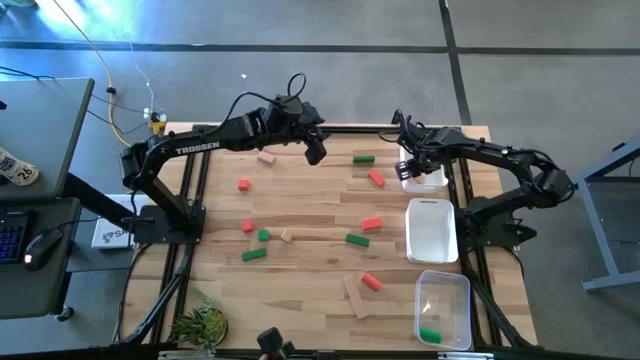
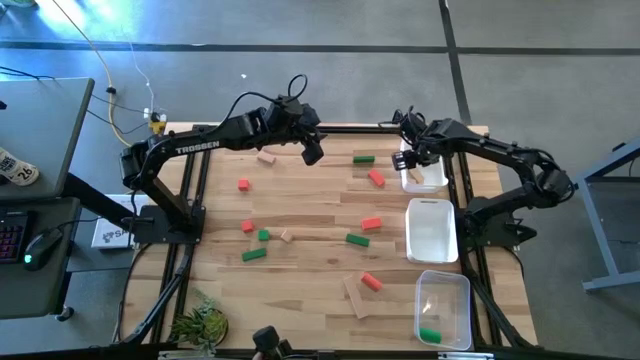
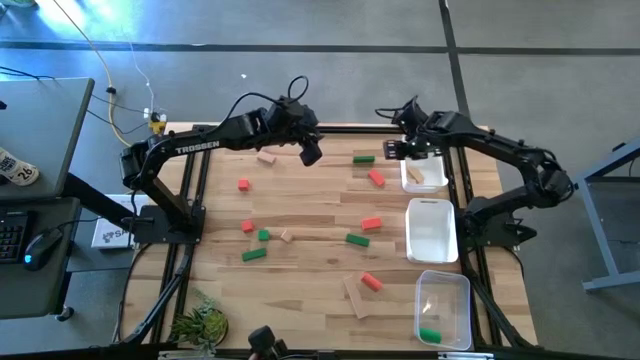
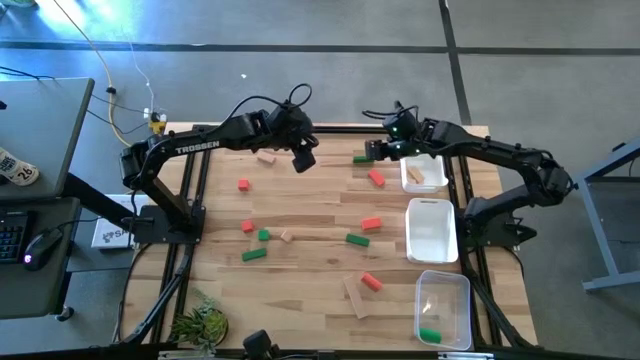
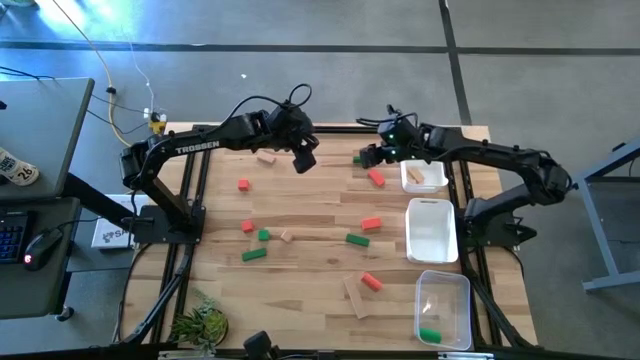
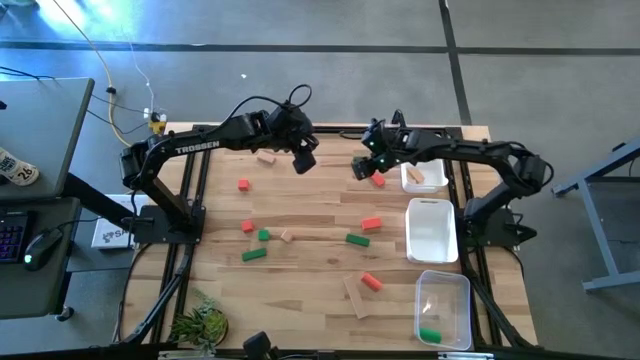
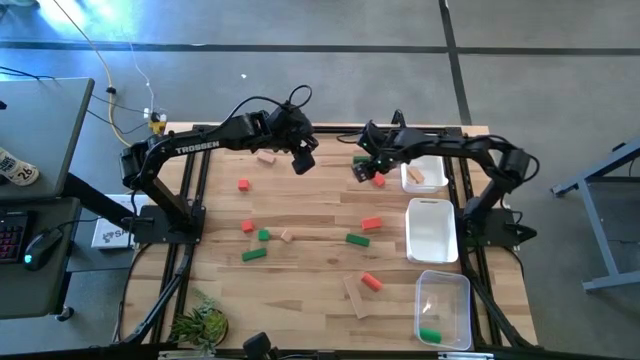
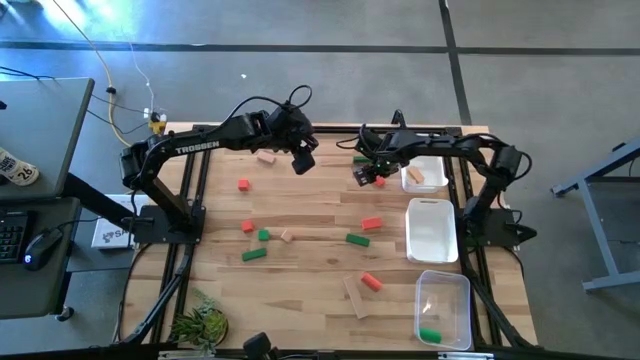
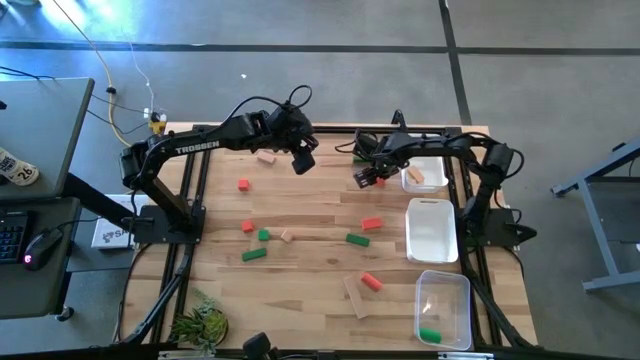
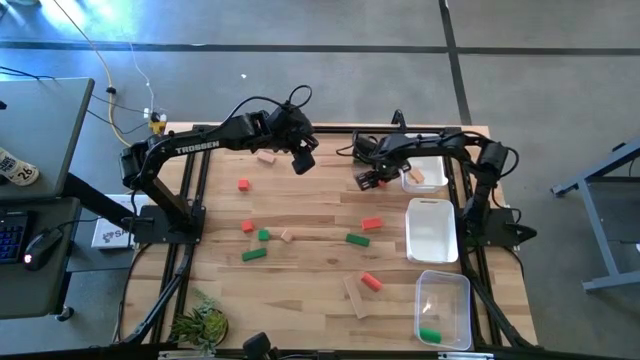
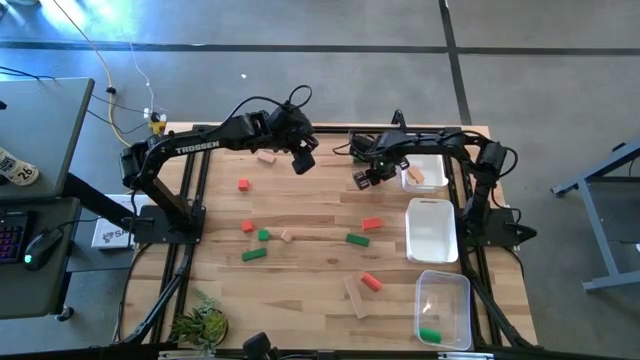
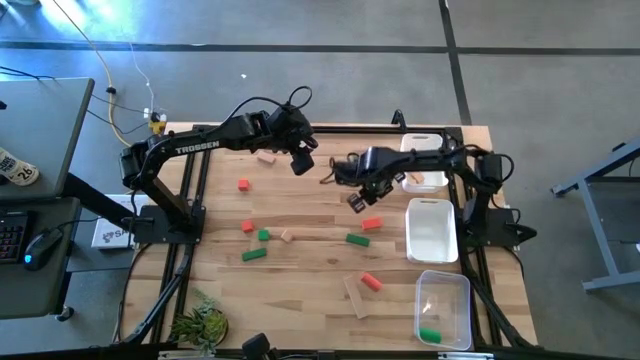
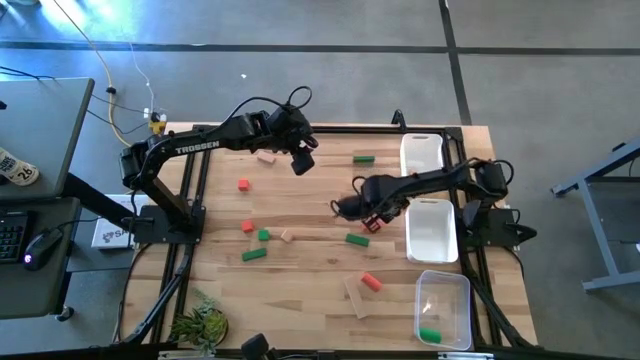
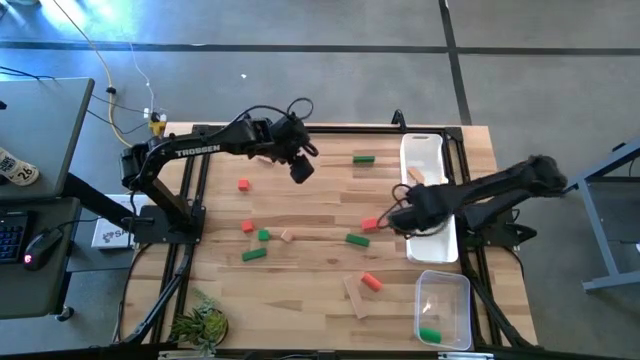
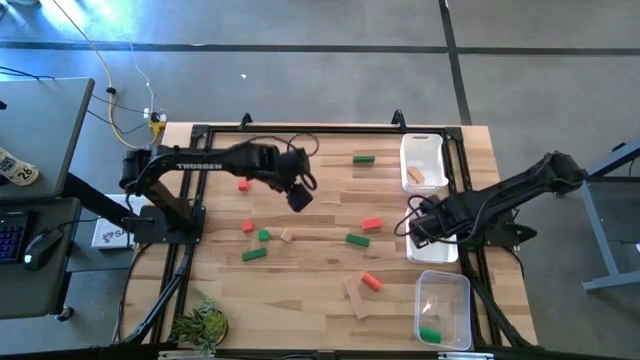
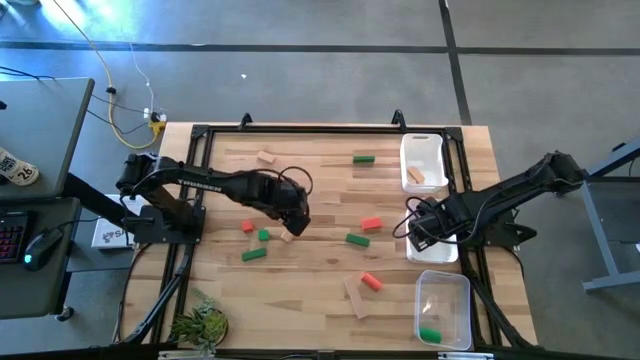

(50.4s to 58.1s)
Task: Sort & place blocks by color
Put the orange block into the bottom white bin

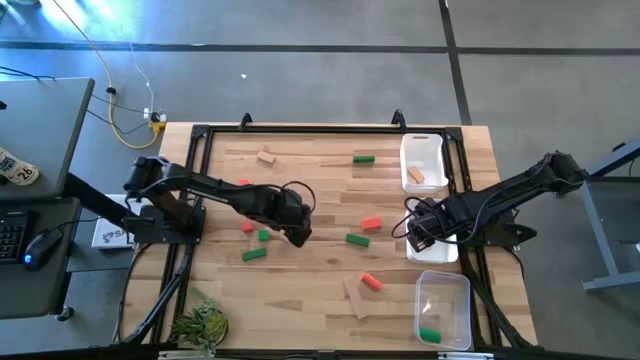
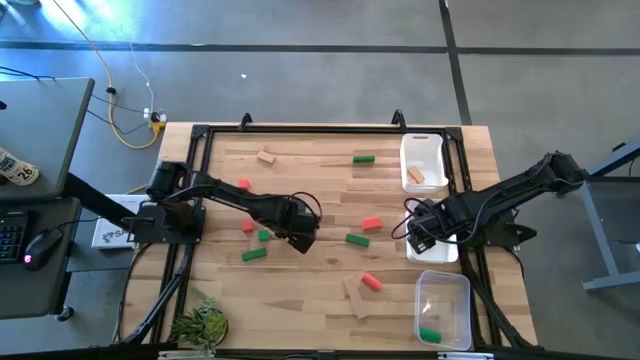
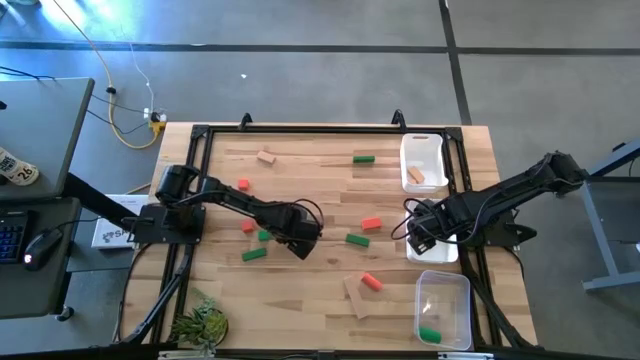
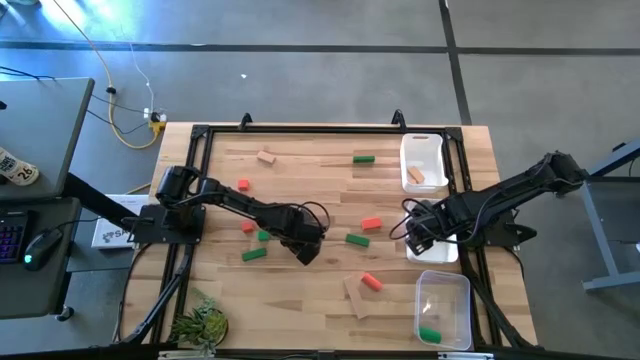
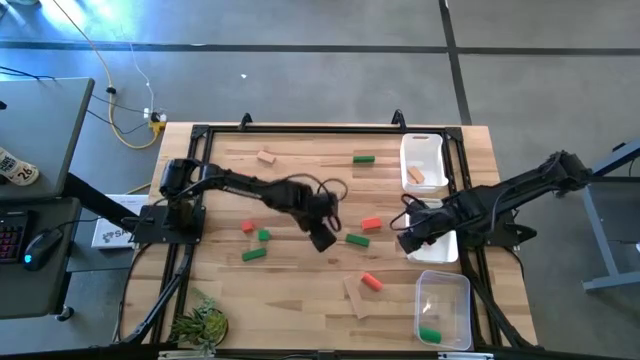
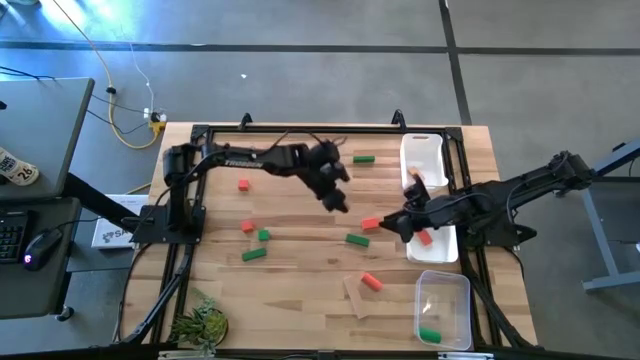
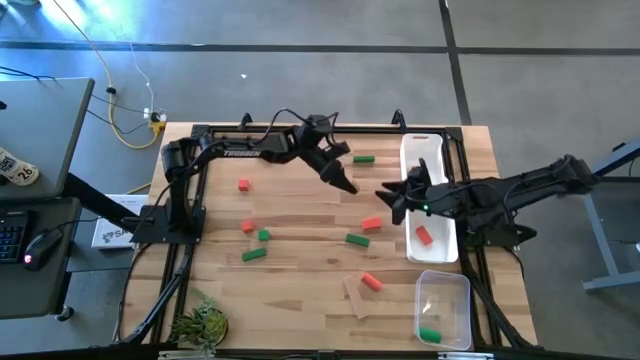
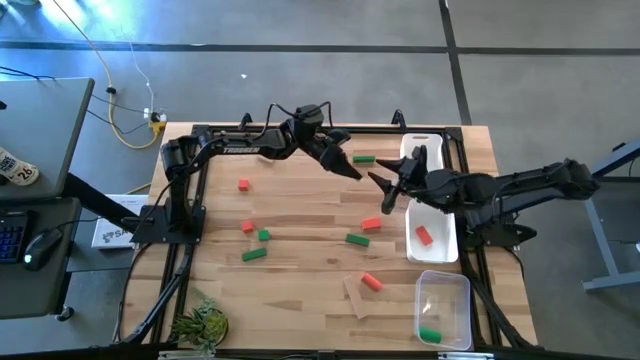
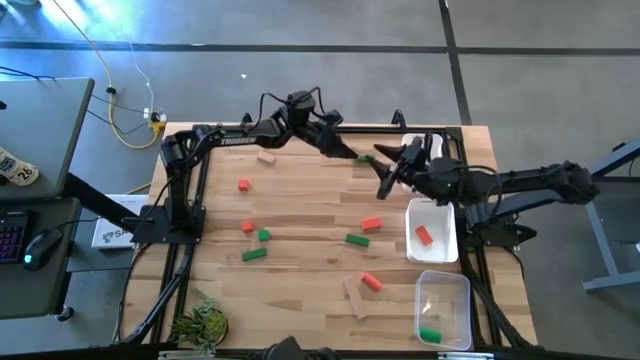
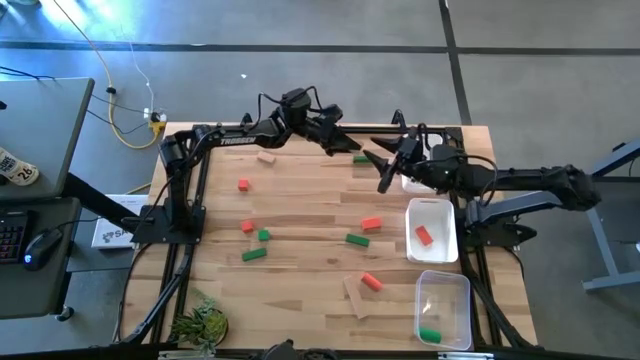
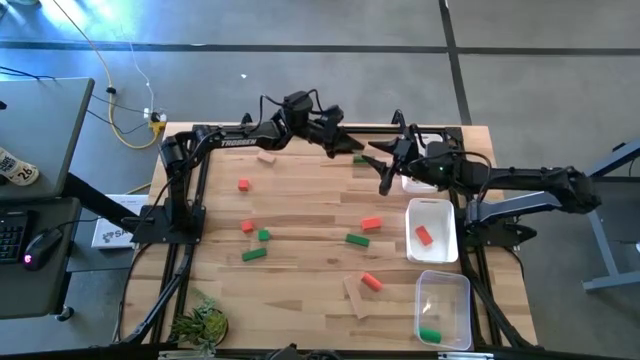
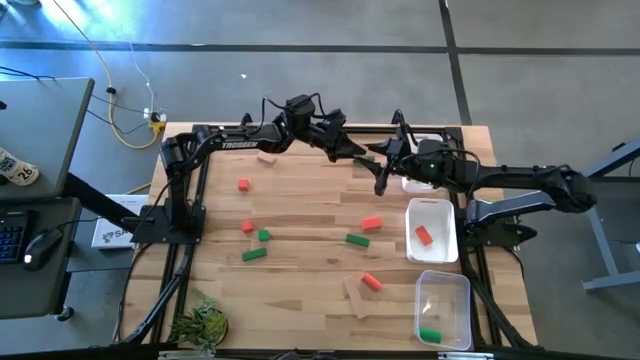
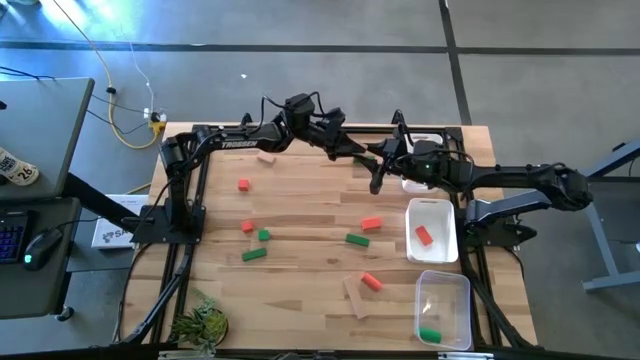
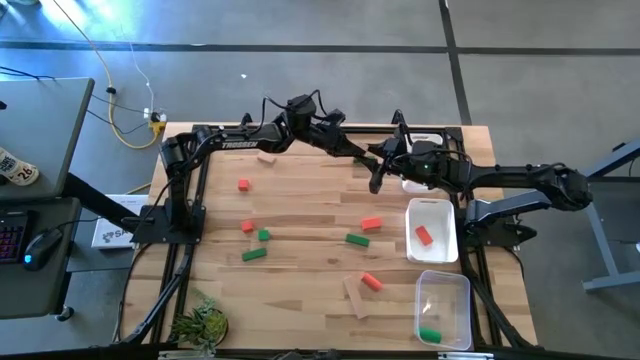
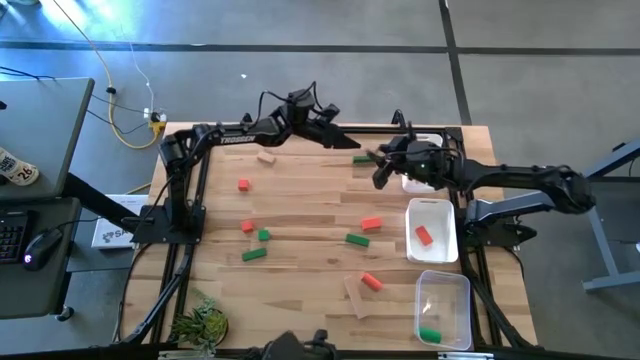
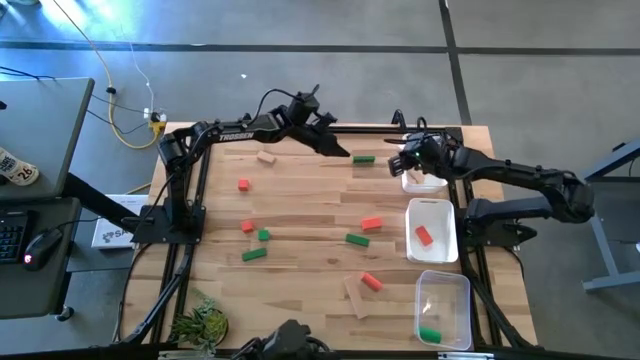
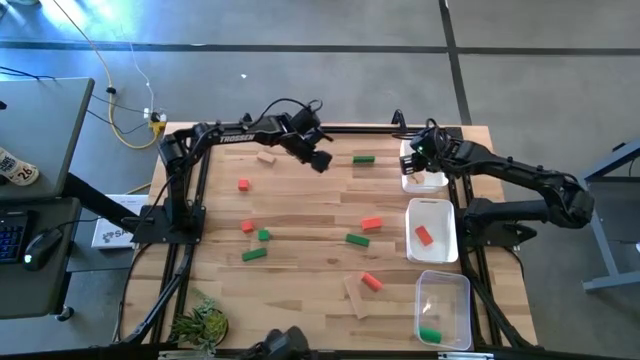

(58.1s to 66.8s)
Put the brown block into the top white bin

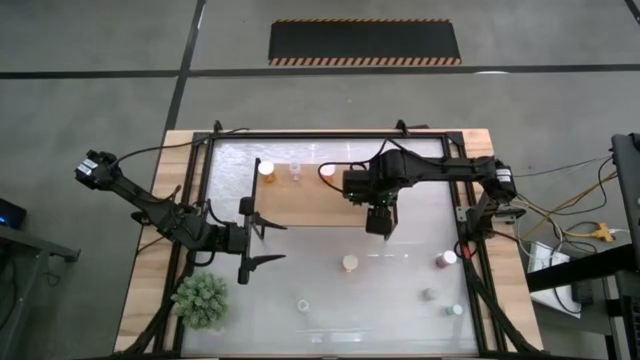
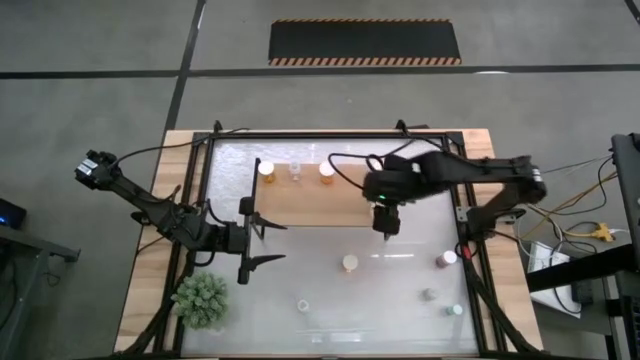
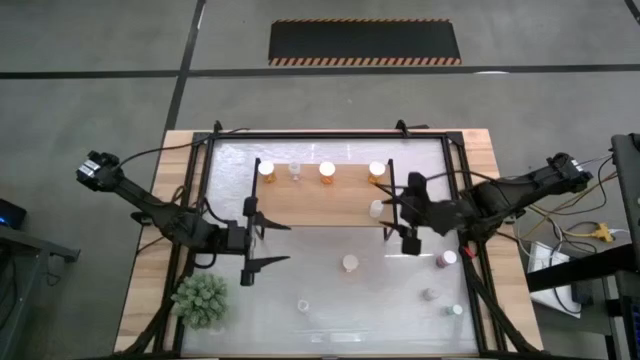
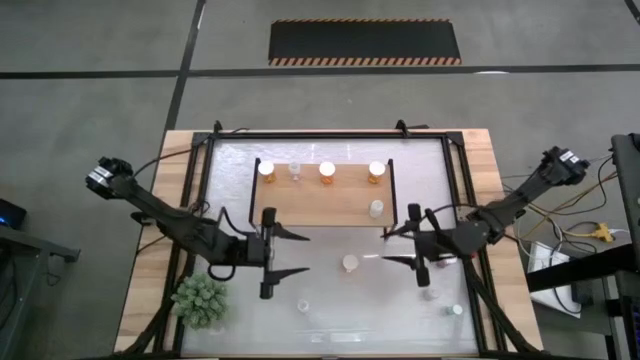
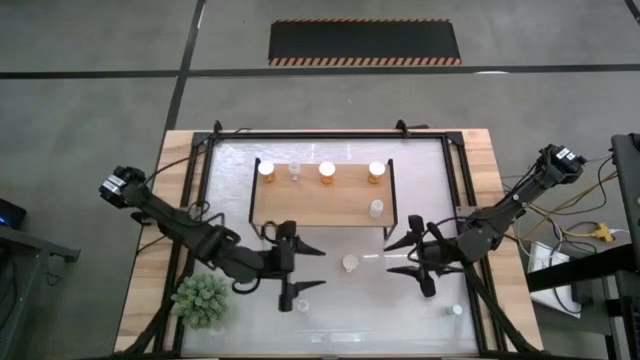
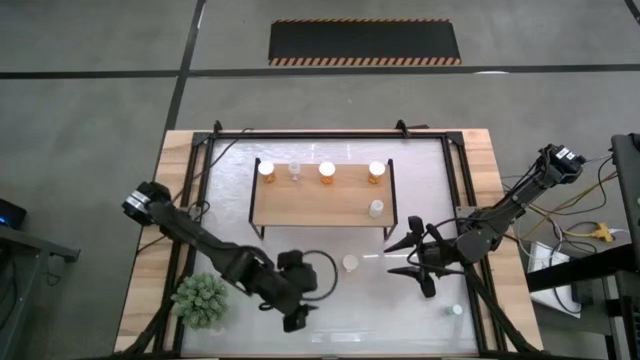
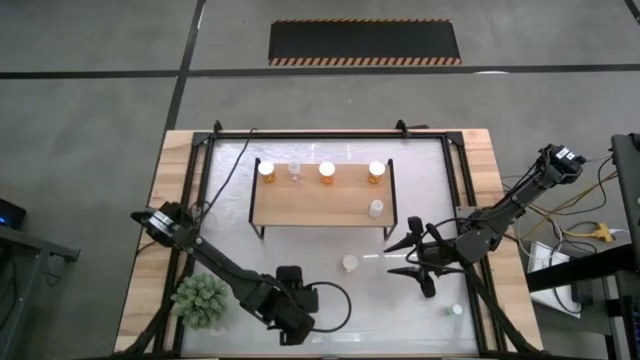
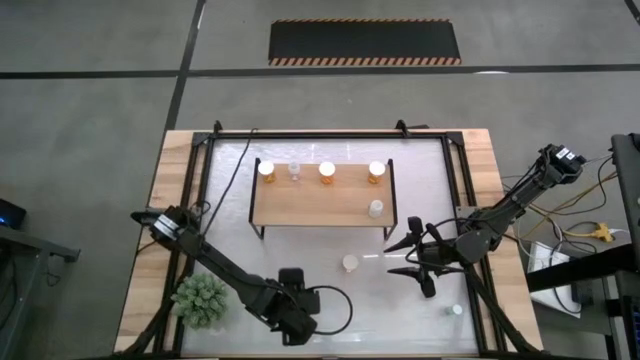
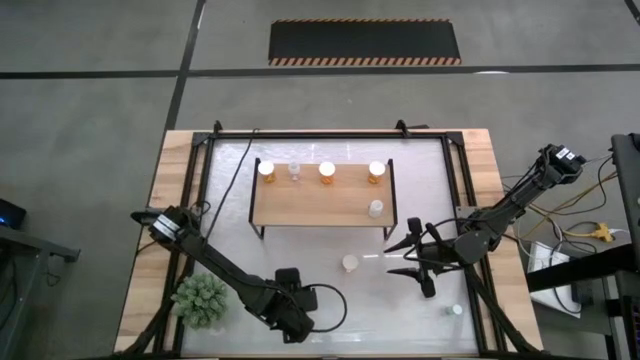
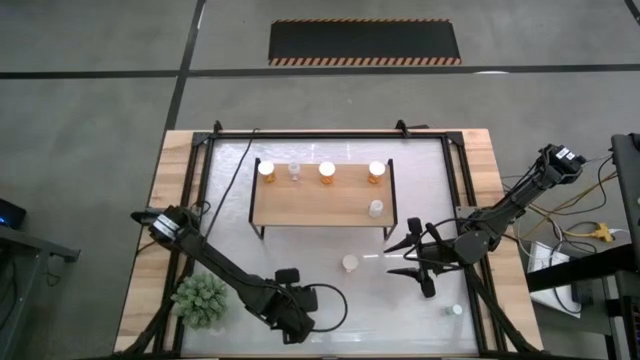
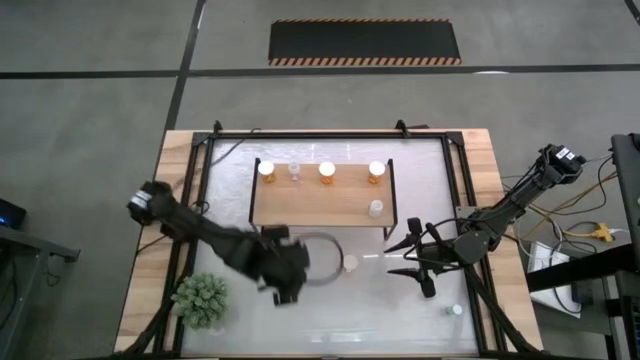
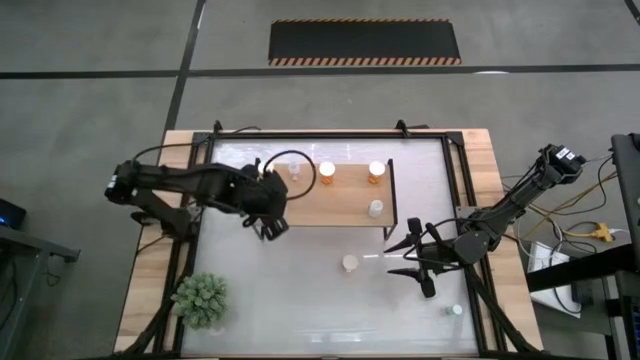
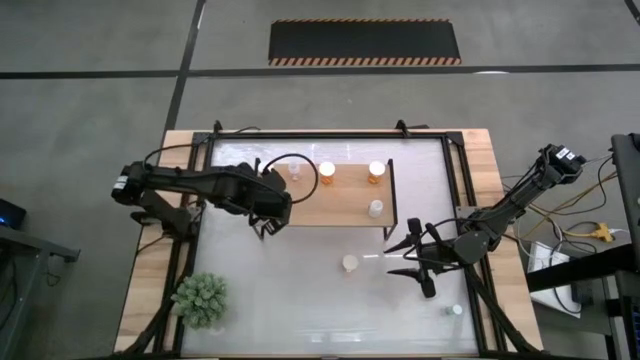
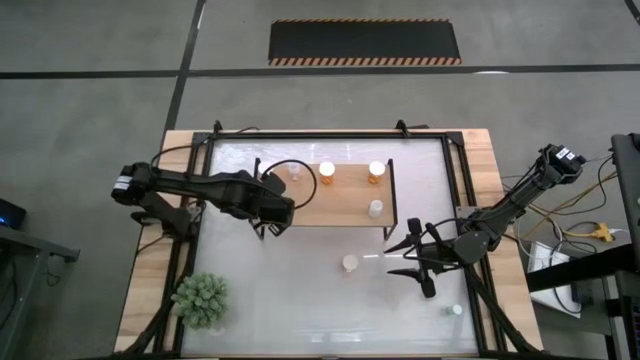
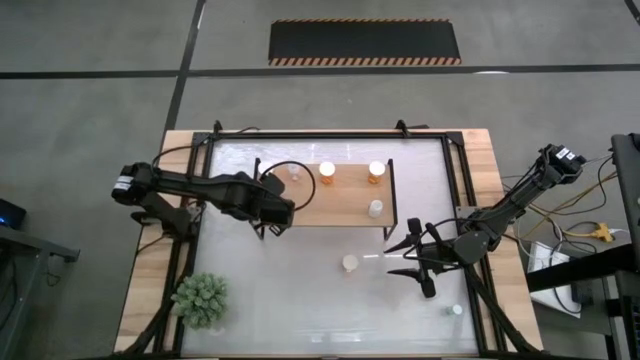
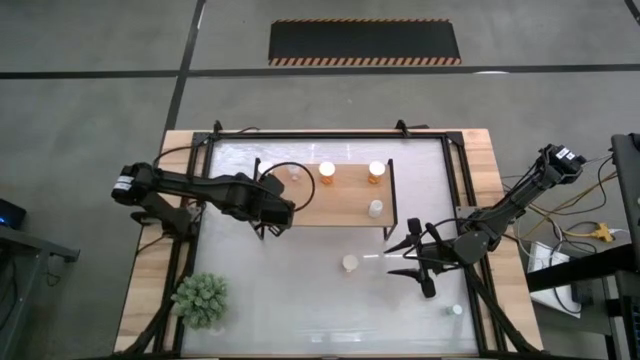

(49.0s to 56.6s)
Task: Pick and place medicine bottles onto shelf by color
Put the white pill bottle on the shelf
